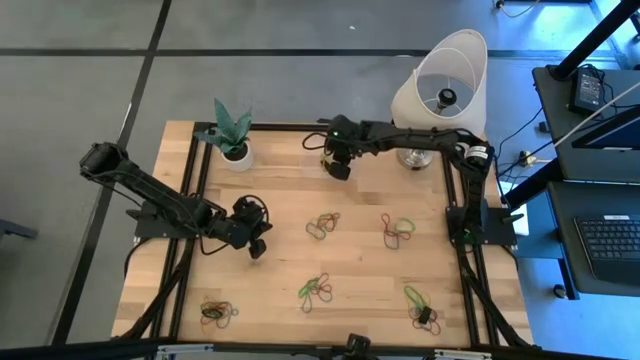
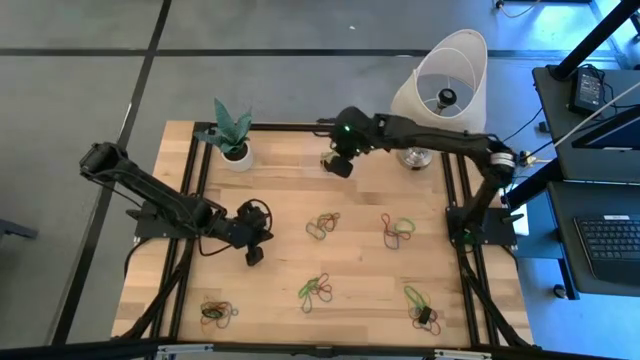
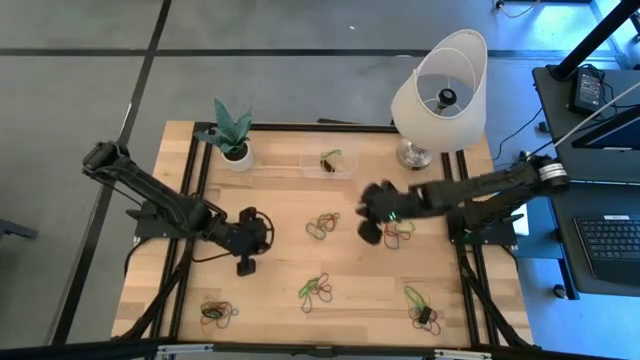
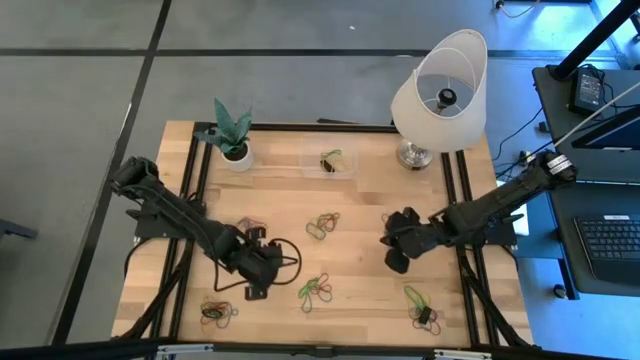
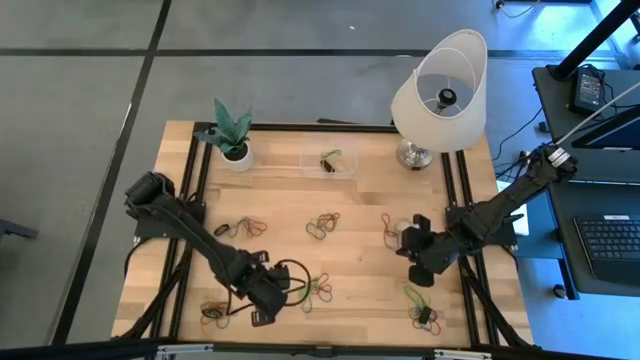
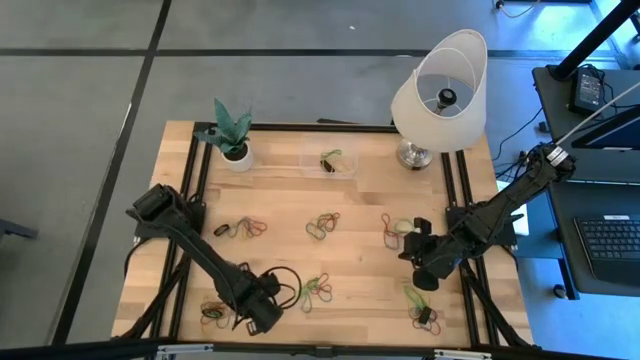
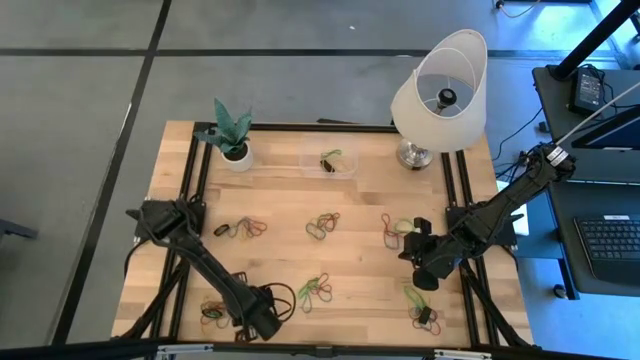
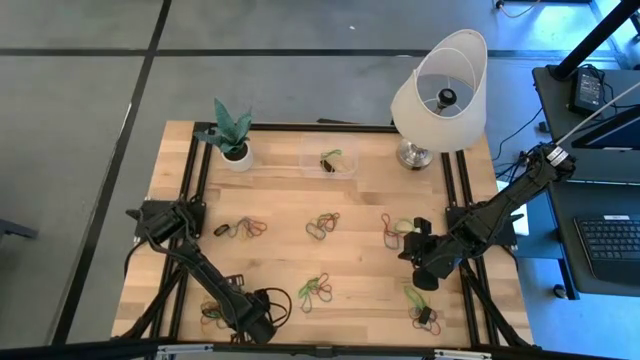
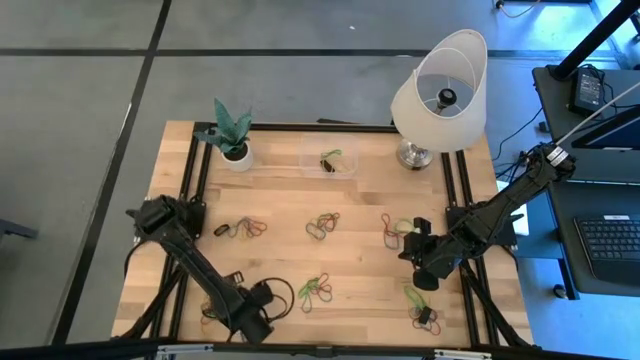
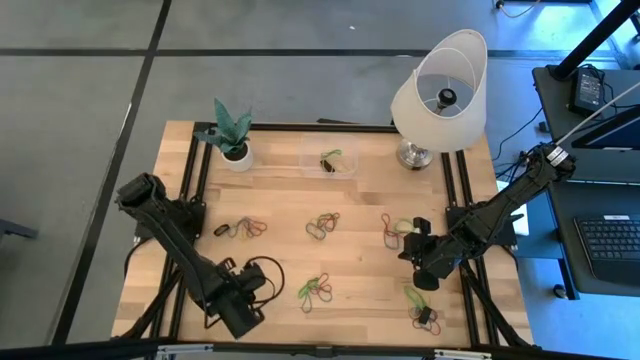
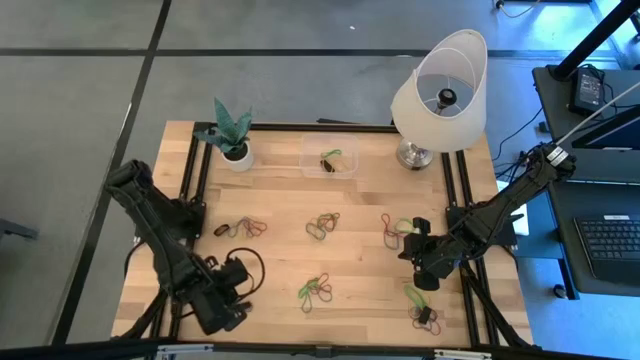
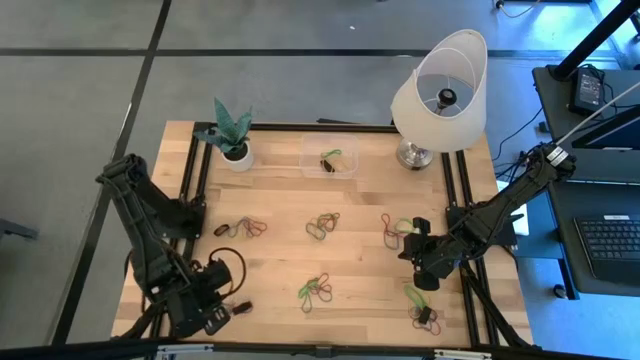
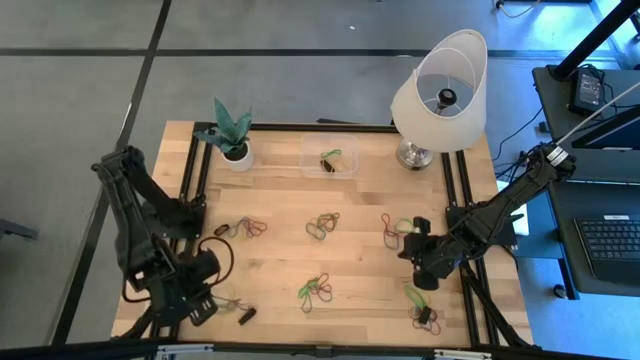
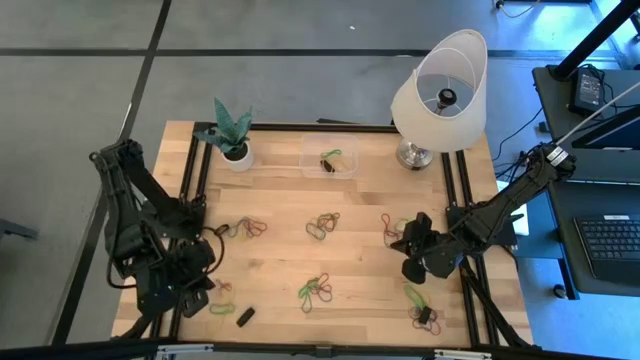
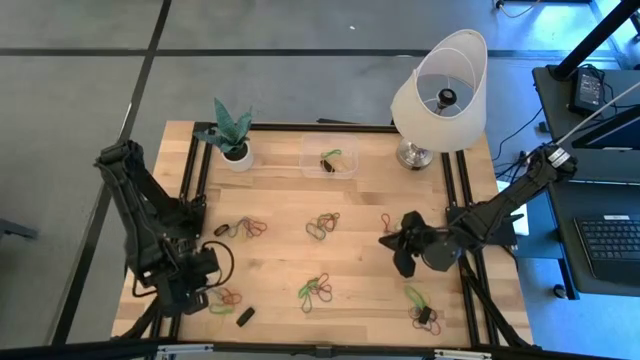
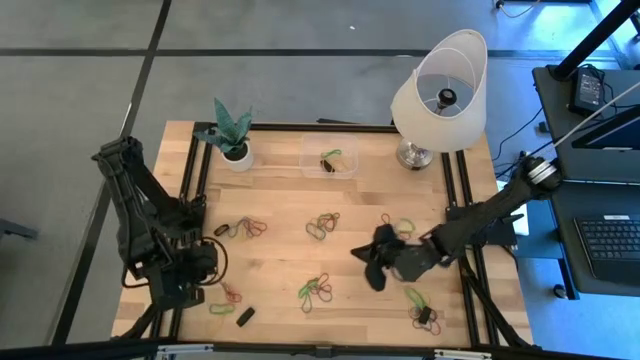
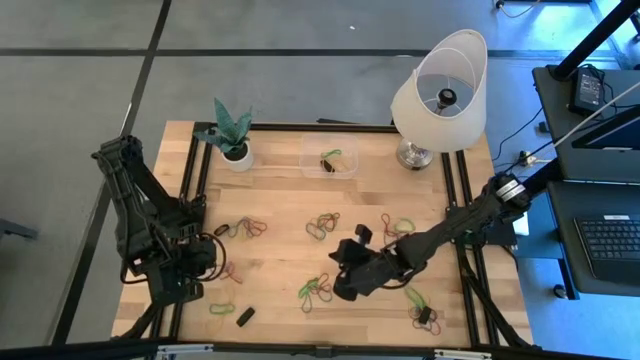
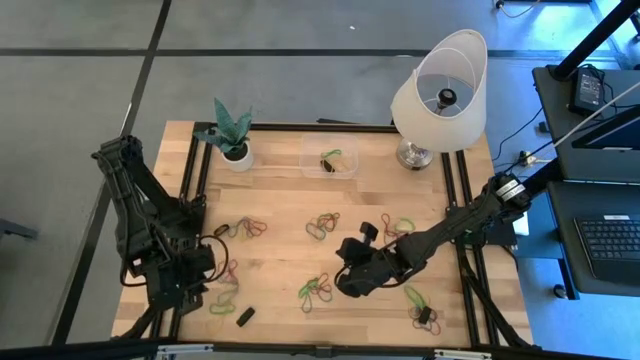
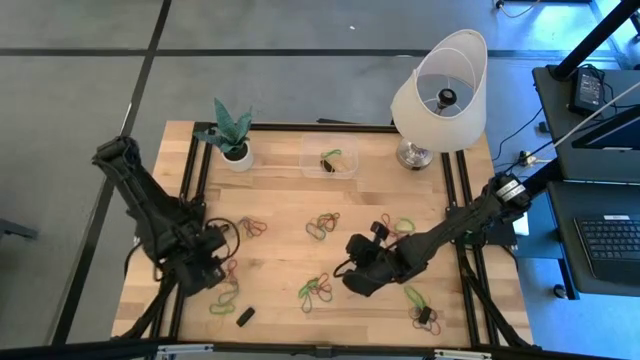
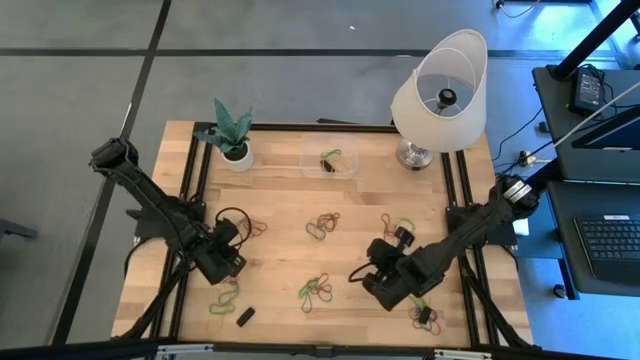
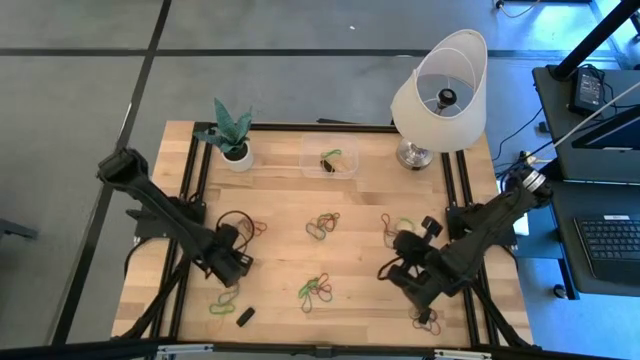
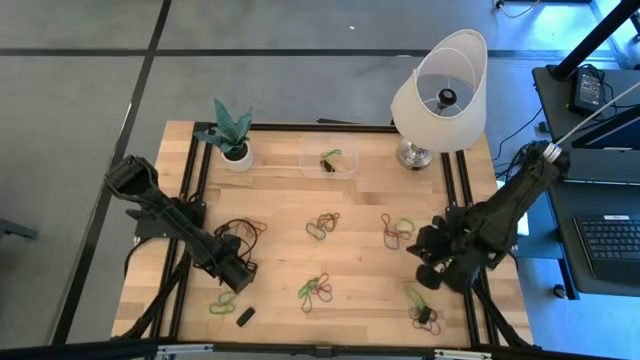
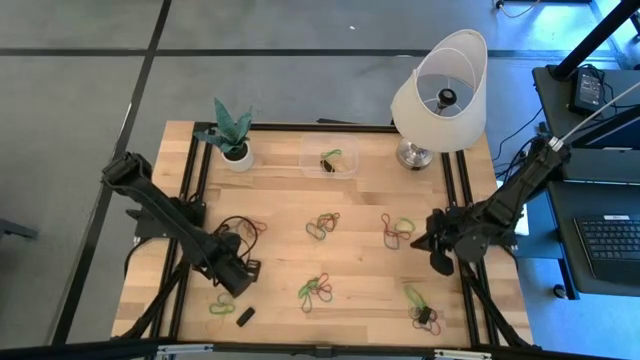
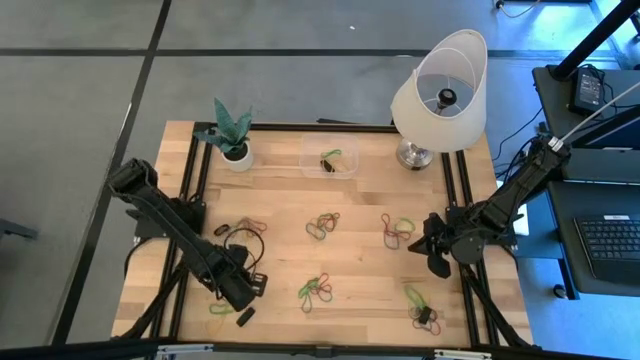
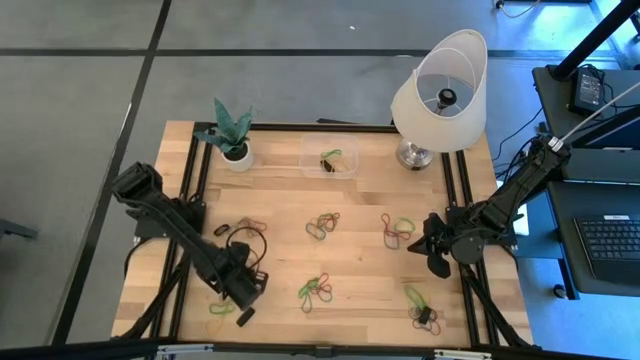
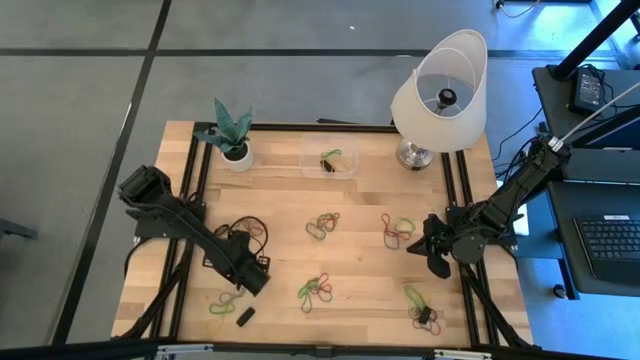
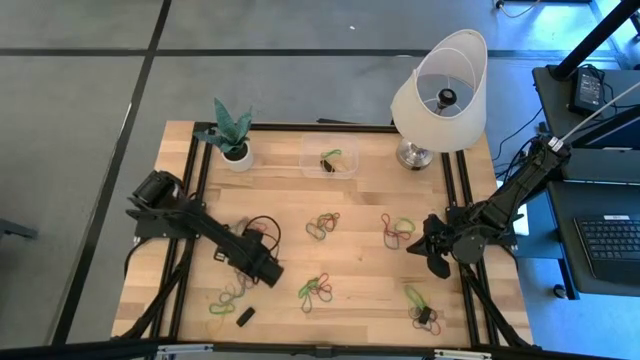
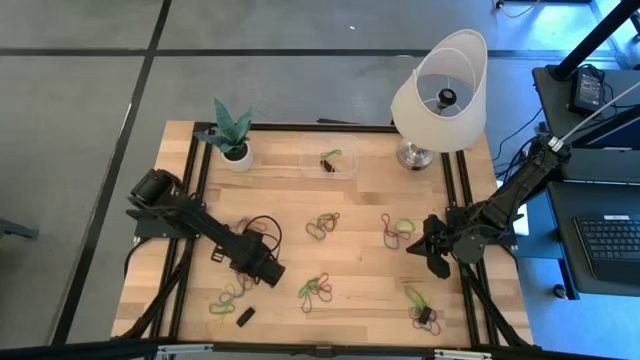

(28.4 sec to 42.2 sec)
Task: Pick and place rubber bands into bin
Put the red rubber band into the transparent bin

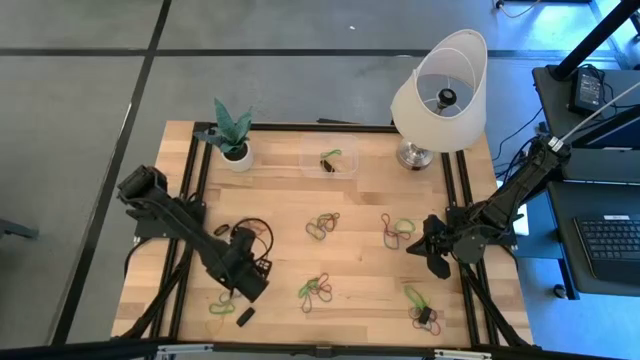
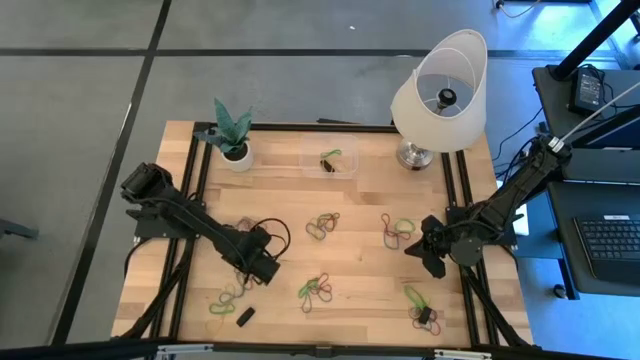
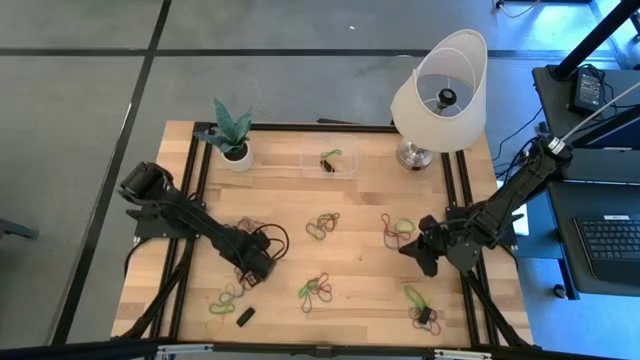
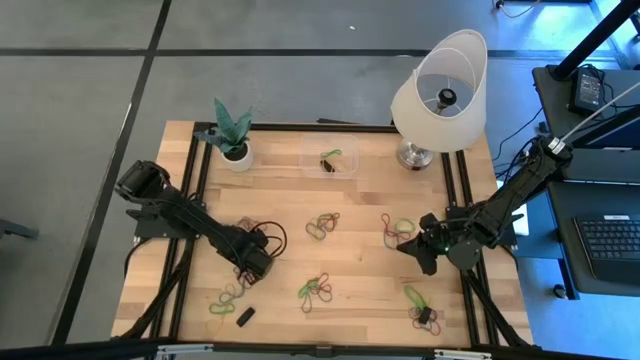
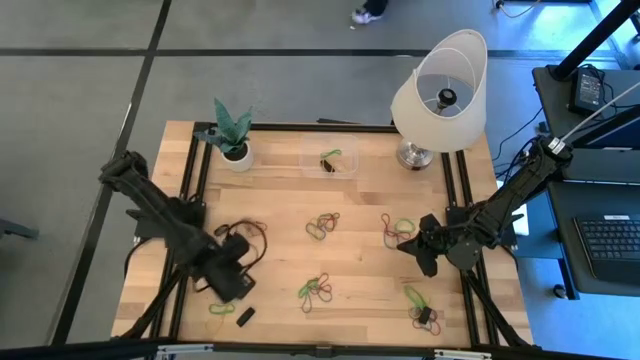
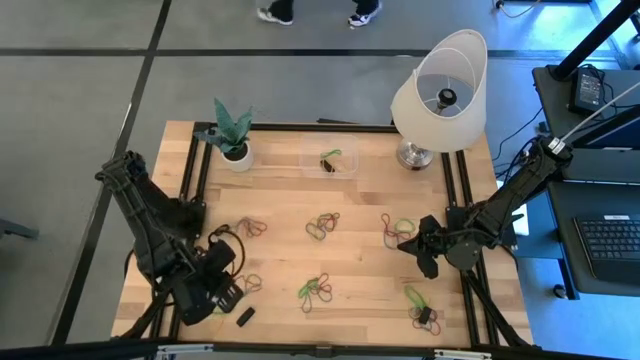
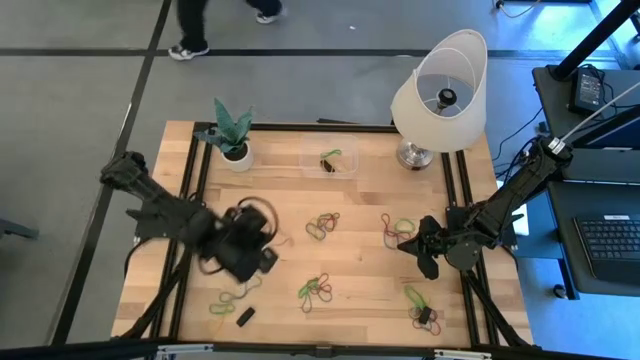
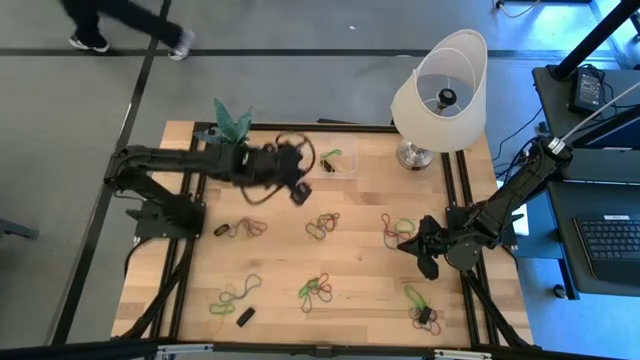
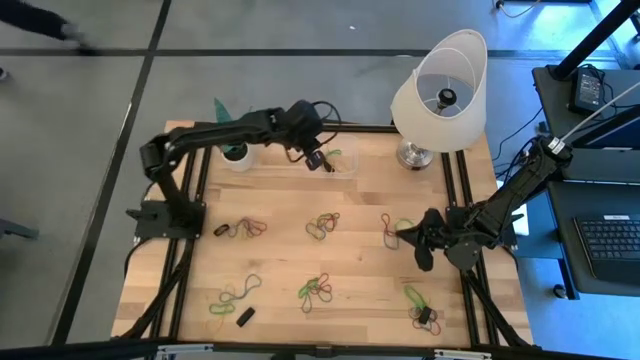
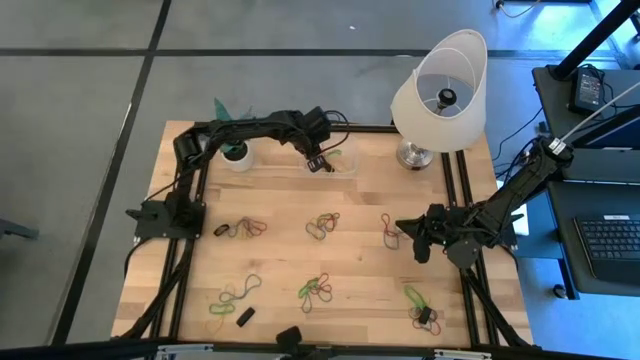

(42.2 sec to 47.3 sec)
Put the red rubber band into the transparent bin

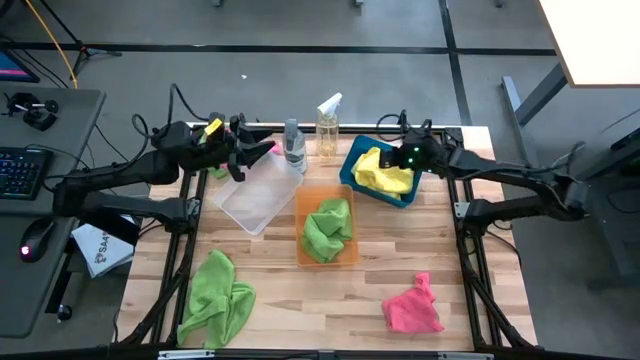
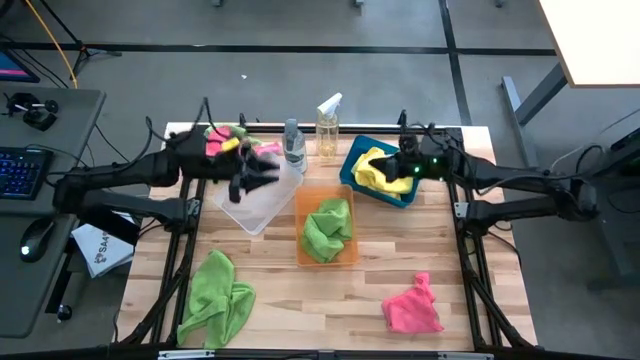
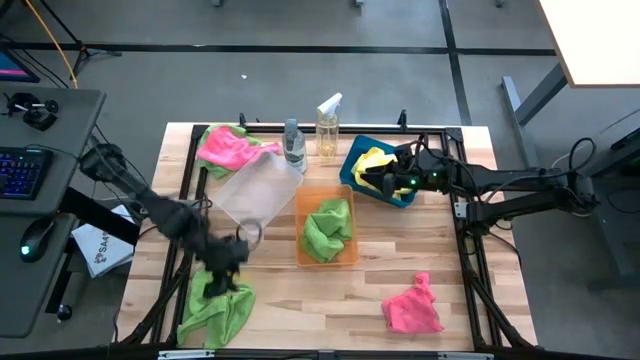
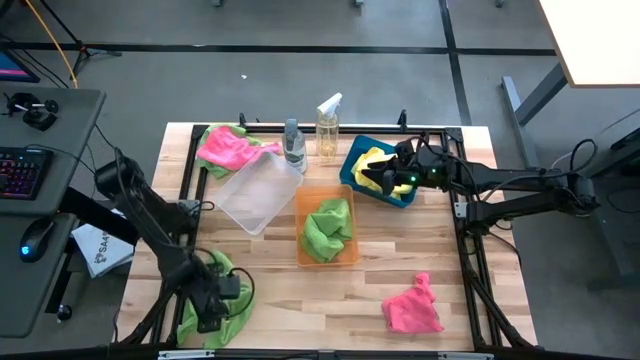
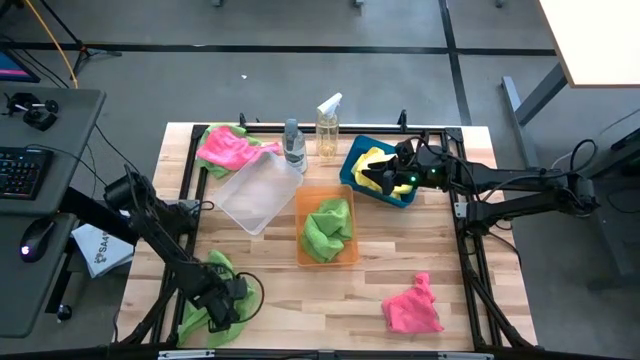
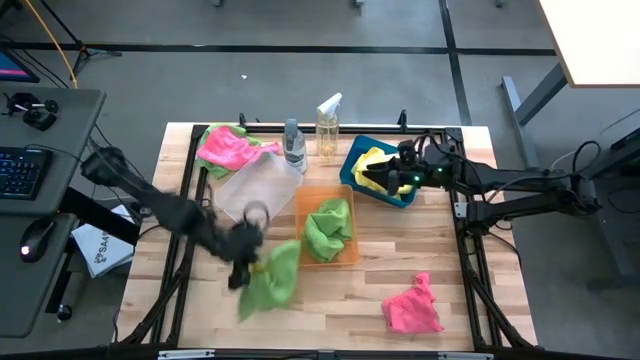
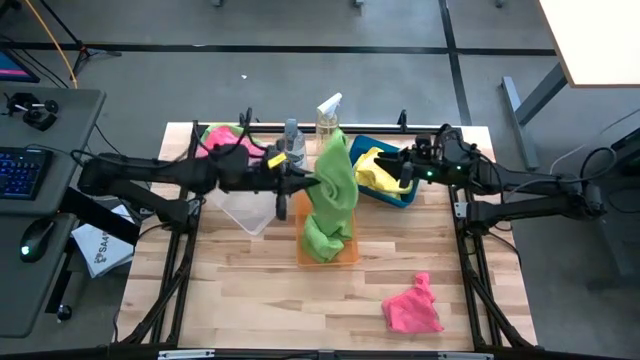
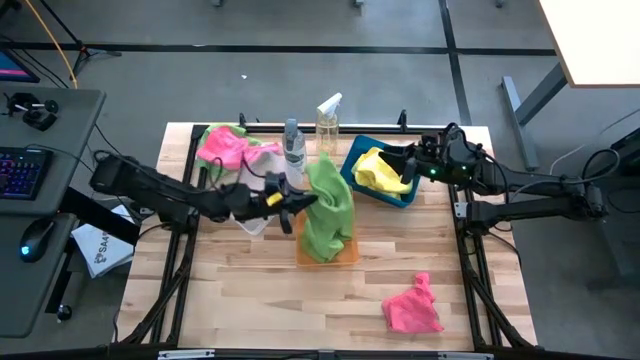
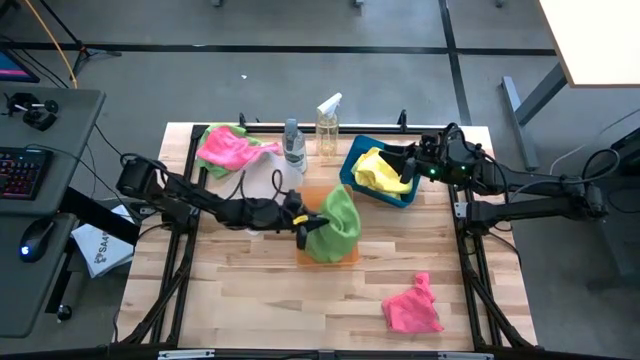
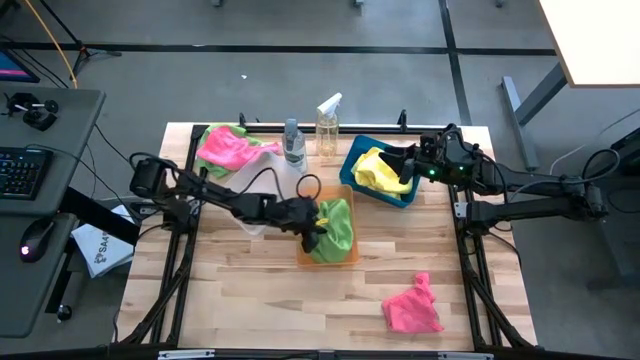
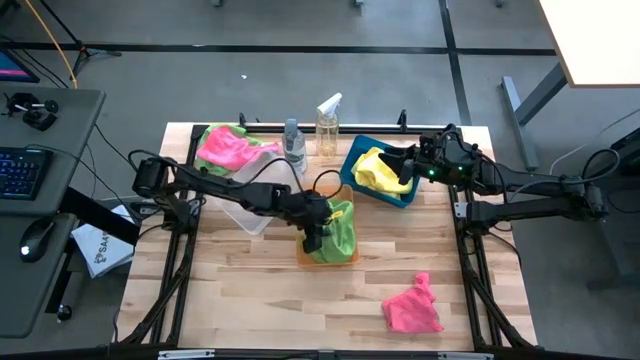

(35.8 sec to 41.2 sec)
Task: Sort microfiber towel by color & place in baskets
Put the bottom green microfiber towel into the orange bin
